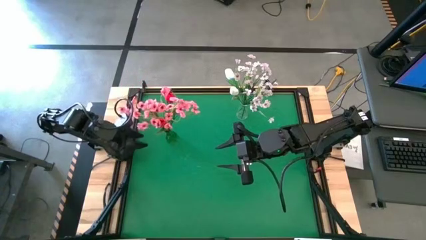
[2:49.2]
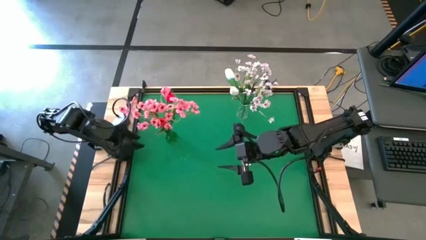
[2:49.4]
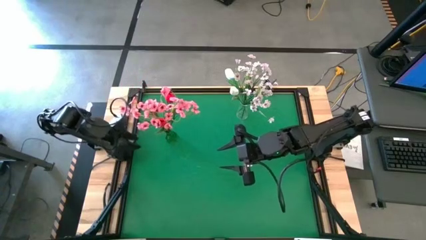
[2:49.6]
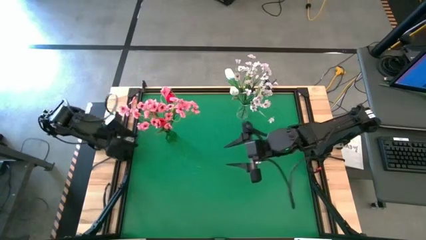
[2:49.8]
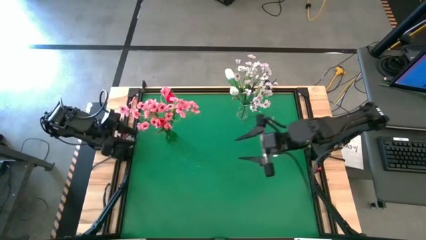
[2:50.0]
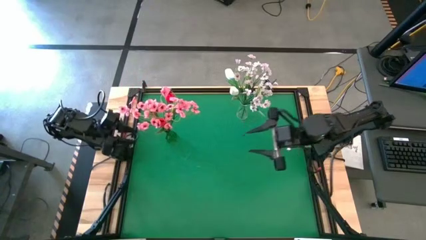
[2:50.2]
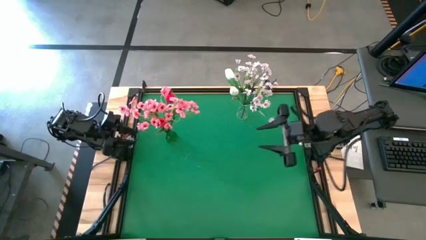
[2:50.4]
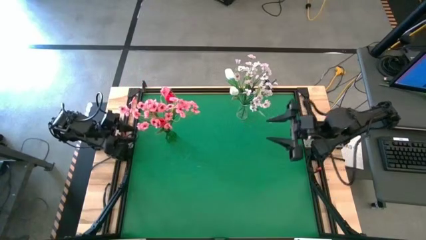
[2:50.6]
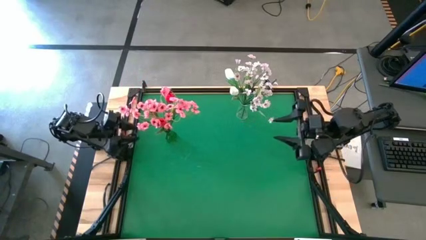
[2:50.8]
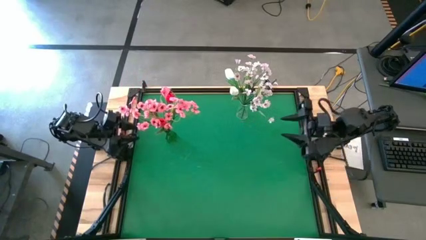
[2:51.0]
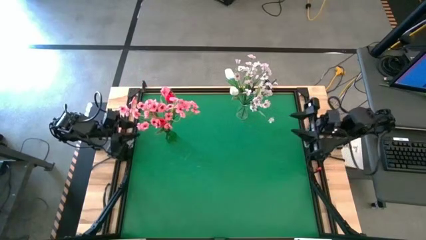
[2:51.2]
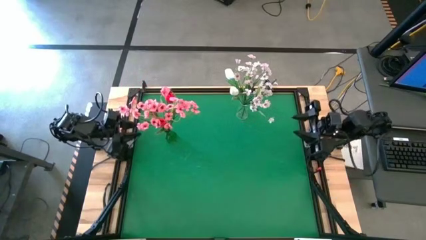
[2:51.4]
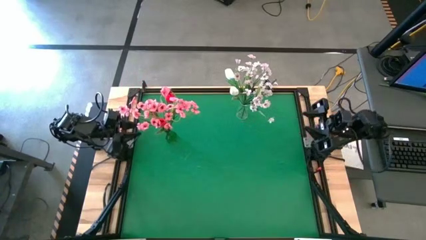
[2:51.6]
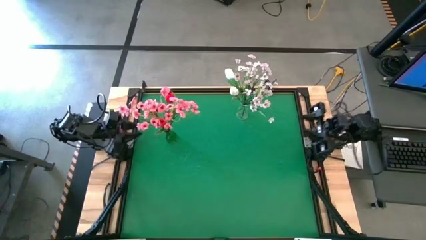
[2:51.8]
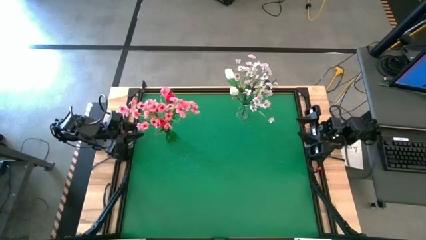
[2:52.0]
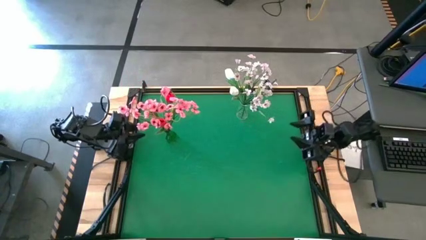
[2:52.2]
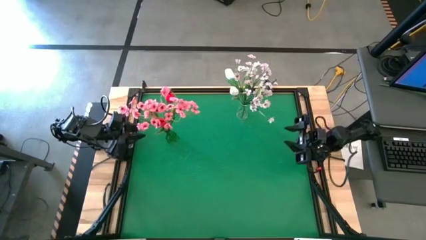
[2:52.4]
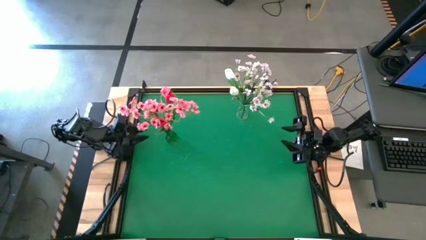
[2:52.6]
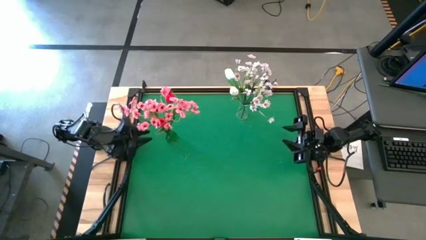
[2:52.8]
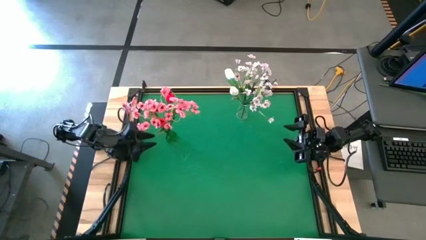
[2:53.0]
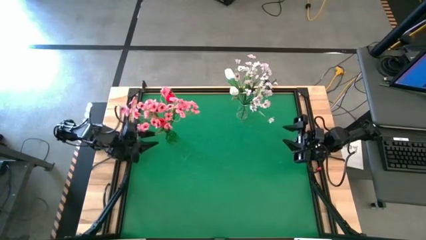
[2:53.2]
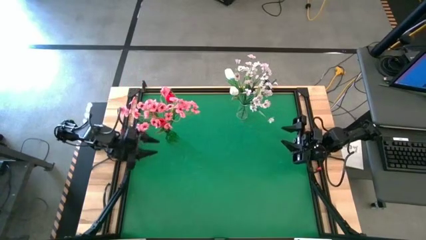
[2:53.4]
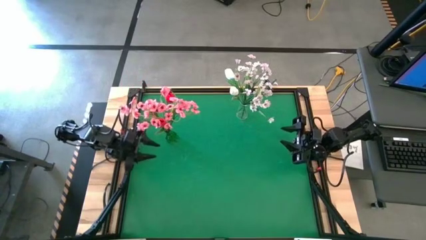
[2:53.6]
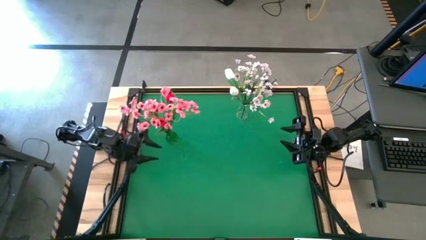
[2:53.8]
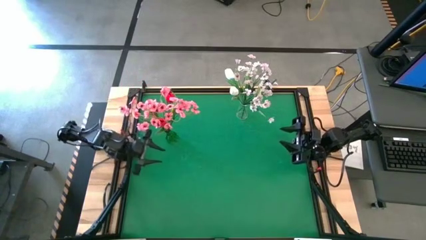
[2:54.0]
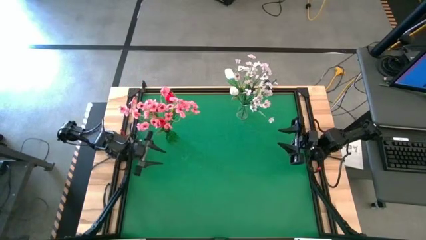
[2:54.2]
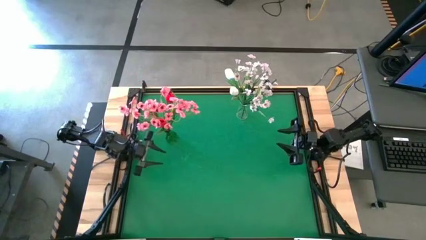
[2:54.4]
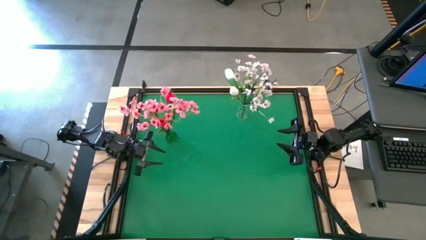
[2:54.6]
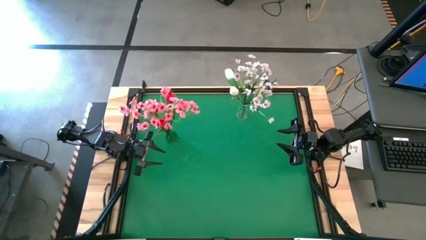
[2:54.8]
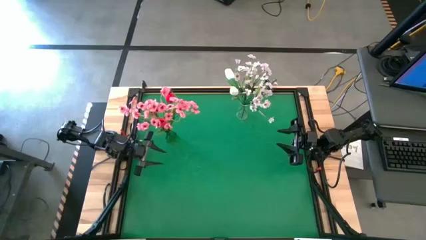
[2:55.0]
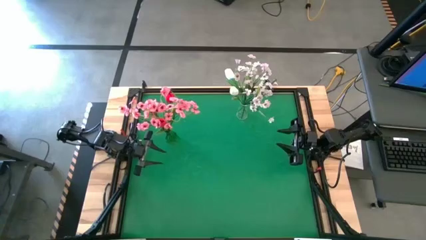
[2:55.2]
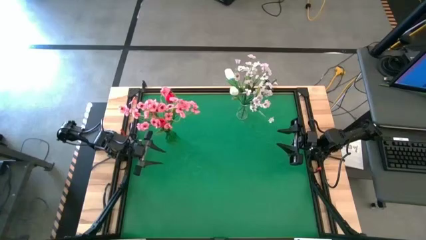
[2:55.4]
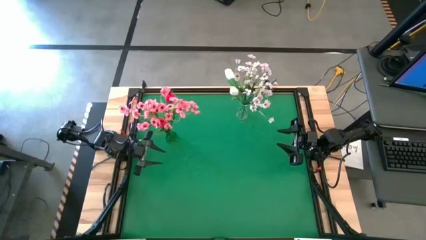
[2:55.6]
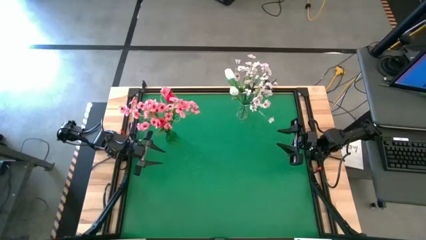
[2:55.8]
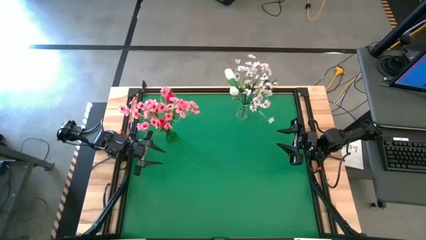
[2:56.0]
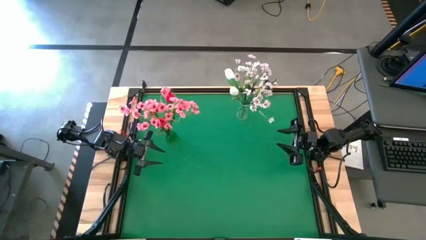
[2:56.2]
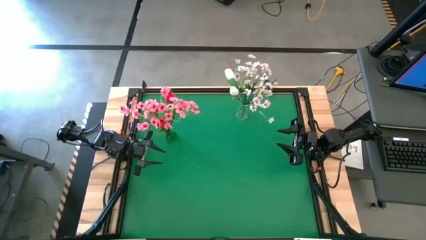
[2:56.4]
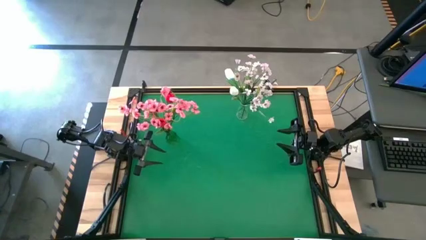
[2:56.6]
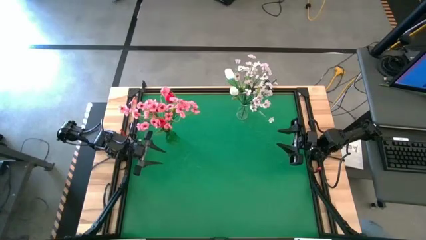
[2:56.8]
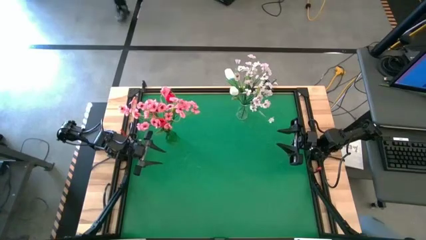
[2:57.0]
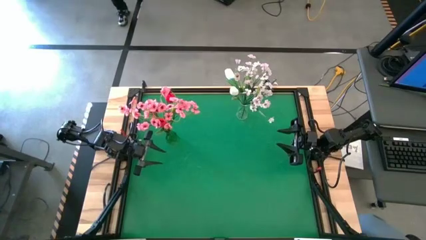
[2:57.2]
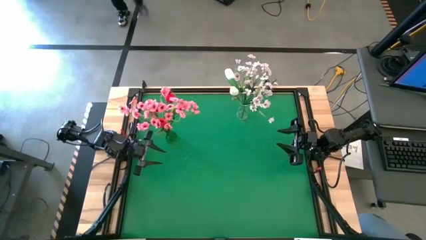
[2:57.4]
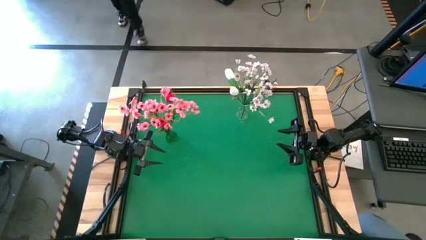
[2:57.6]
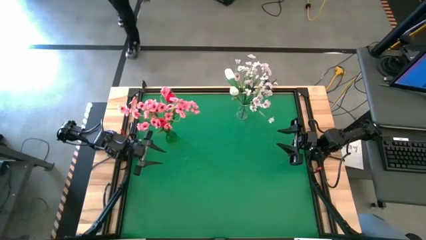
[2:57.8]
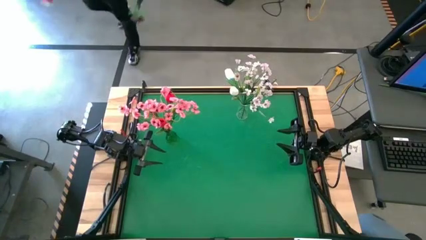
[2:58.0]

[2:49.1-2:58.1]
Task: Sort flowers into vase by color
Return to Home Position

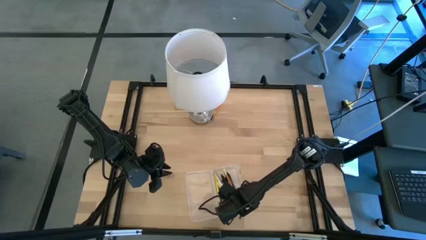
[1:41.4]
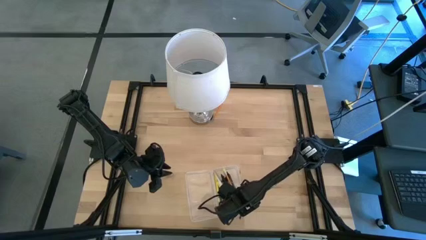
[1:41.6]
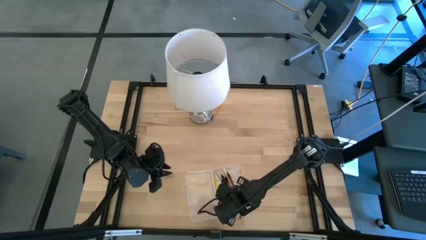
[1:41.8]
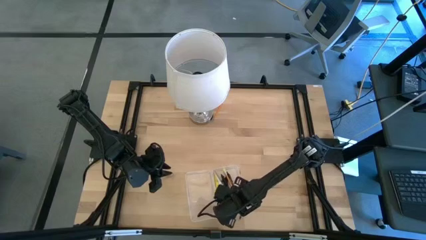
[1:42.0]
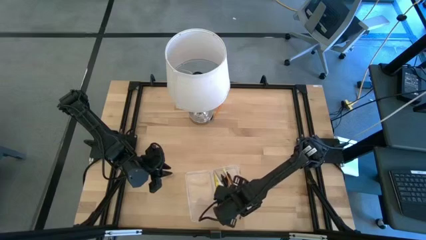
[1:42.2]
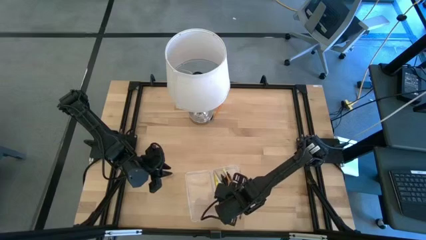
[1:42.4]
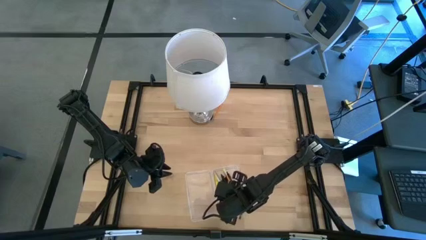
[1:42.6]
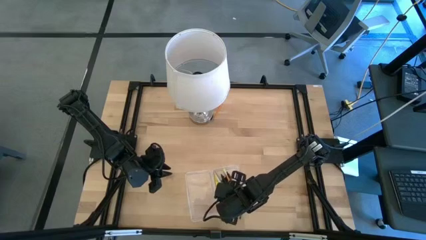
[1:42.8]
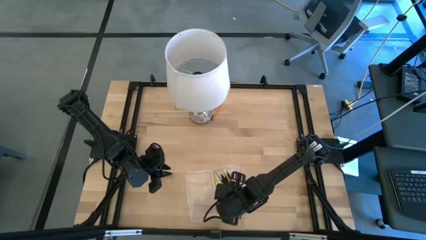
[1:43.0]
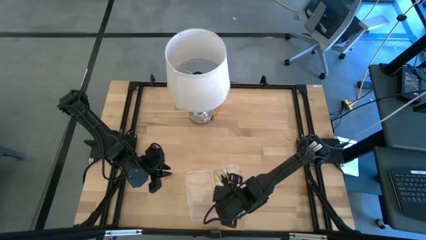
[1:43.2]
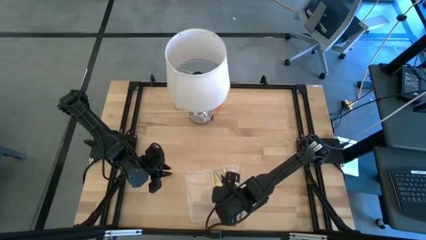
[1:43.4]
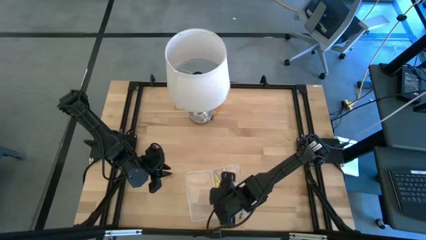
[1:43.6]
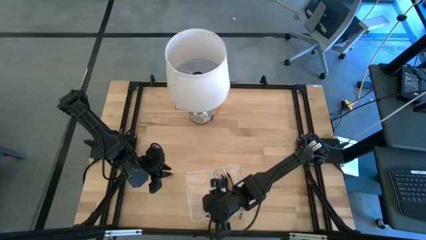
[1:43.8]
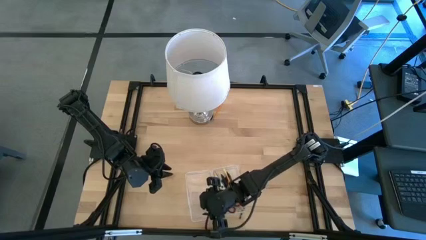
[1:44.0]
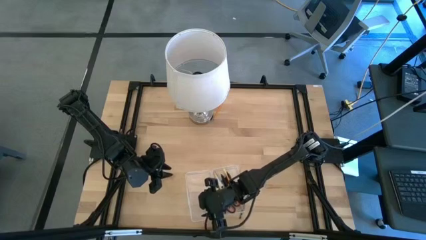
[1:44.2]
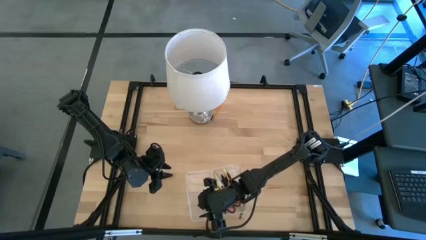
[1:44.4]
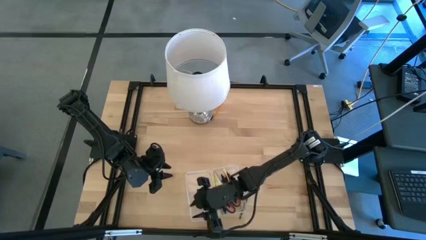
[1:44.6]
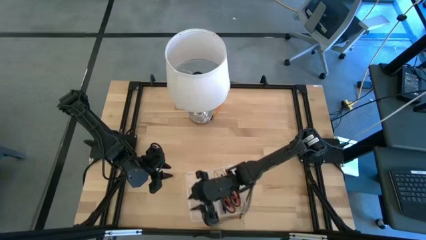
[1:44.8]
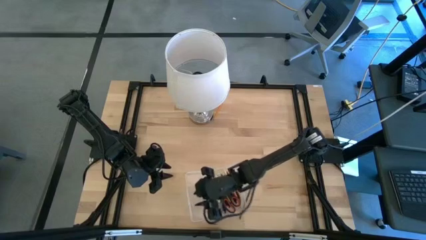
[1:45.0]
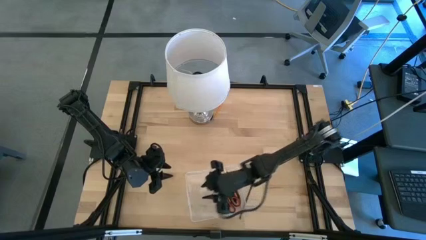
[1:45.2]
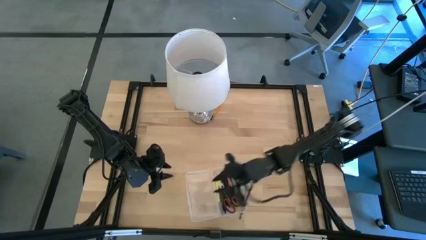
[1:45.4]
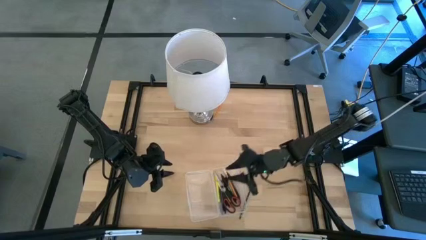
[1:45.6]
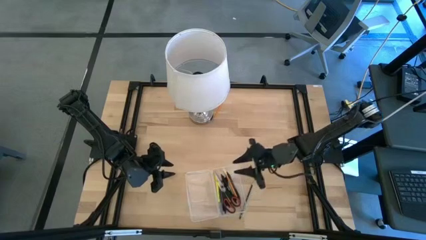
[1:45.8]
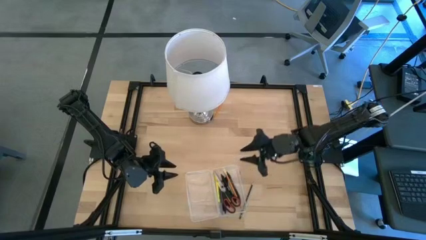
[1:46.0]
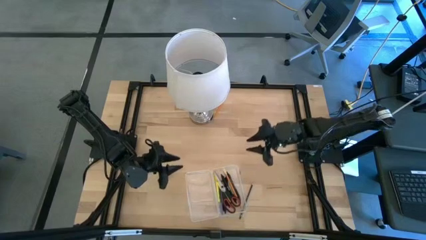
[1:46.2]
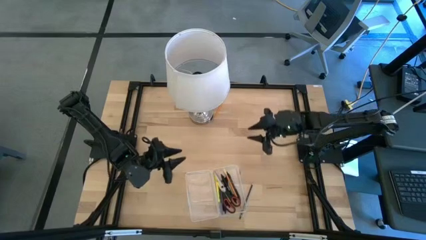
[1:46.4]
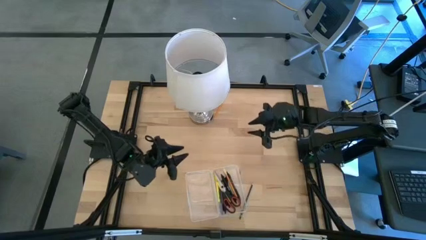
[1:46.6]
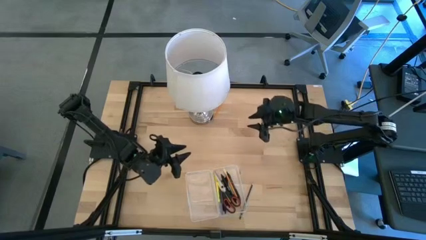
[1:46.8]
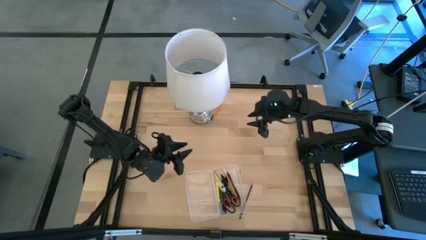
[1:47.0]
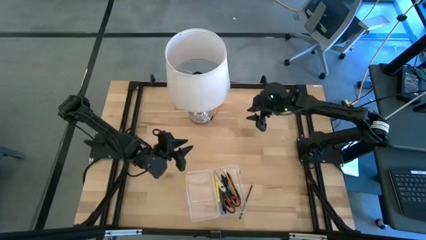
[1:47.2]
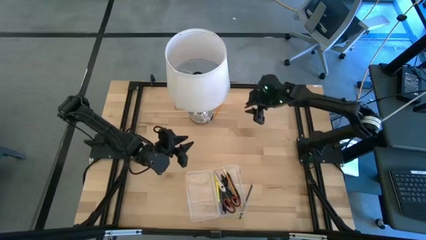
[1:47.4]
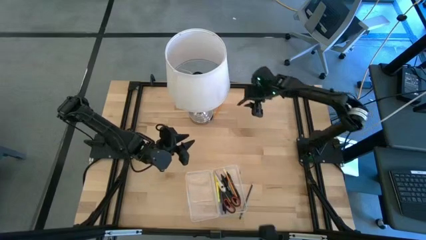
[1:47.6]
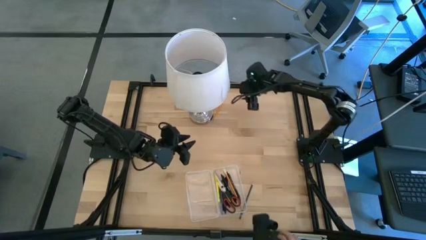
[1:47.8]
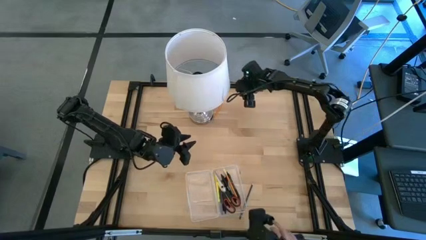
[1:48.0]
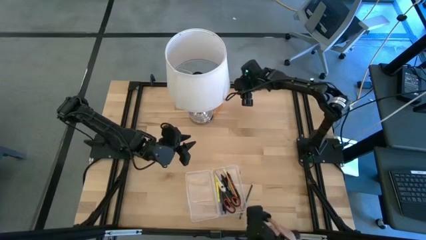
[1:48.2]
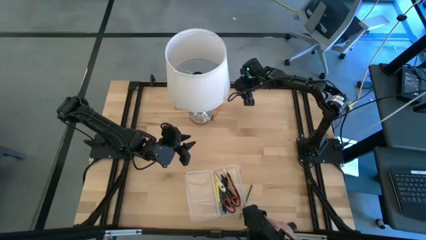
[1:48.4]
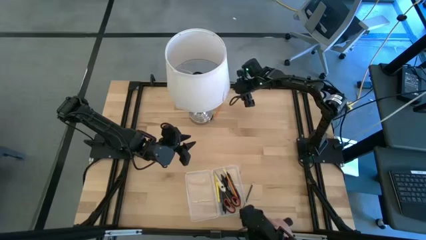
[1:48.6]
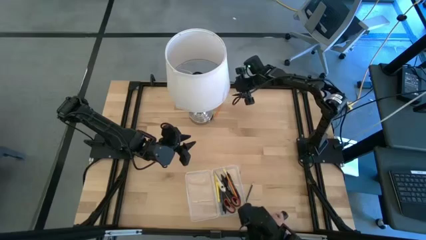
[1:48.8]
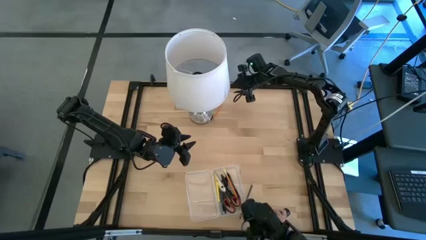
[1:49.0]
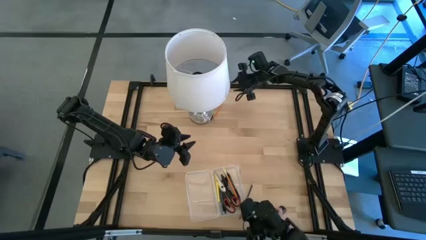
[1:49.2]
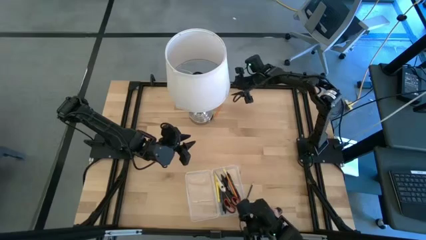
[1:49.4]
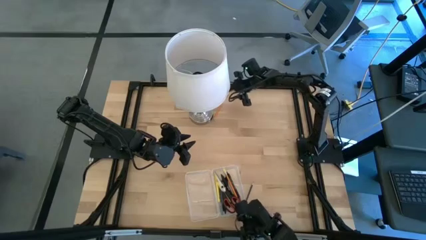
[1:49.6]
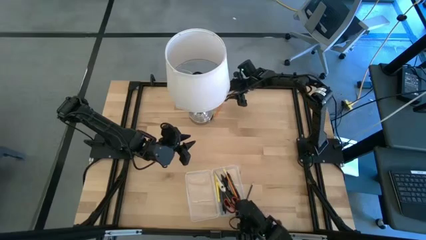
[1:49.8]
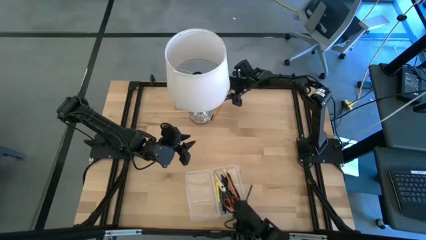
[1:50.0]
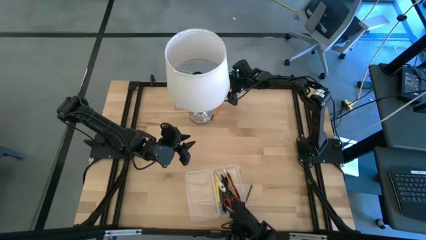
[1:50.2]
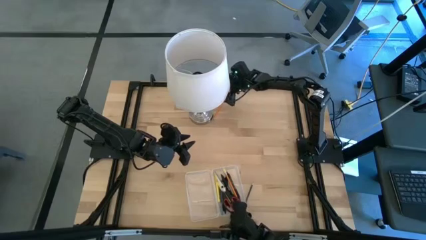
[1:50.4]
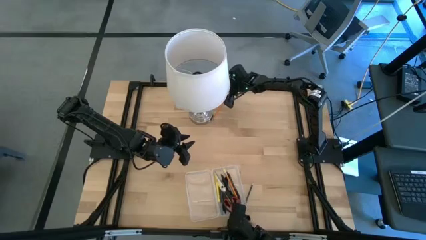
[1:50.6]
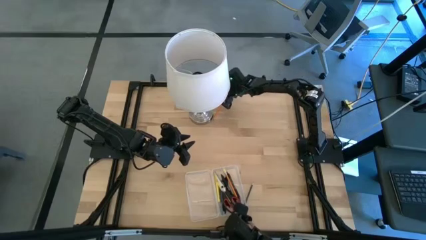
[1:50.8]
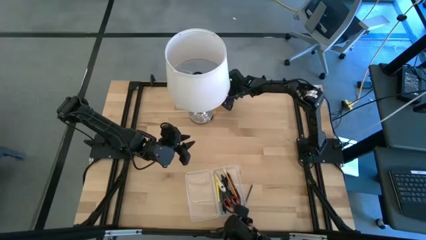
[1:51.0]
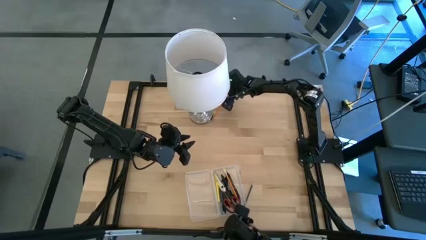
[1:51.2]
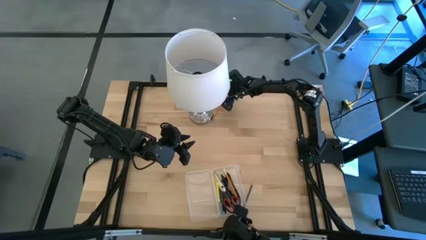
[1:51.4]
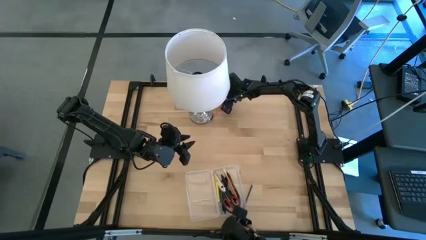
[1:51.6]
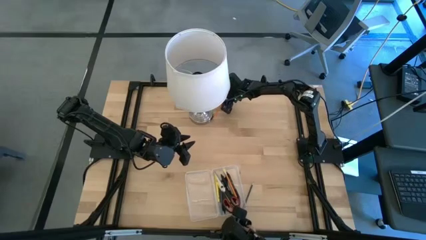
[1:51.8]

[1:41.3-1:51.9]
Task: Pick & place school supplies into a supply box
Put the orange pencil into the transparent supply box
